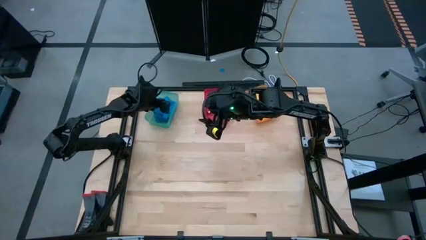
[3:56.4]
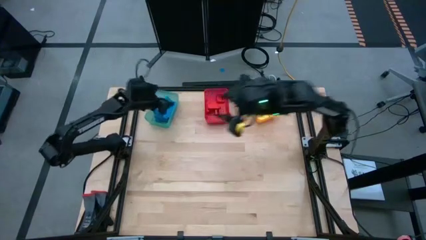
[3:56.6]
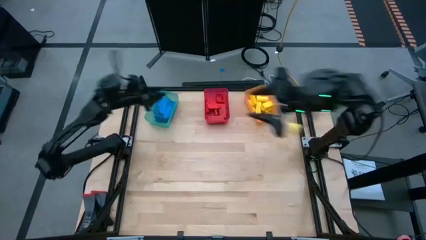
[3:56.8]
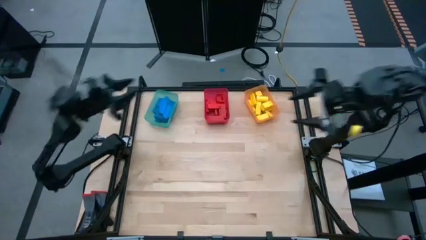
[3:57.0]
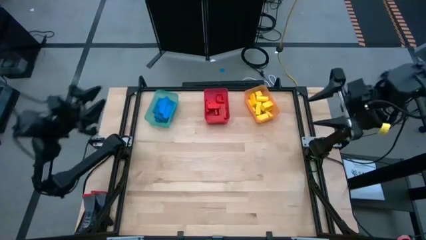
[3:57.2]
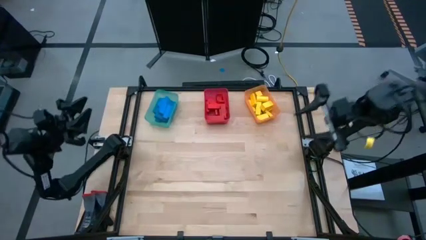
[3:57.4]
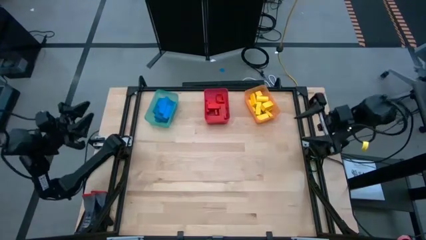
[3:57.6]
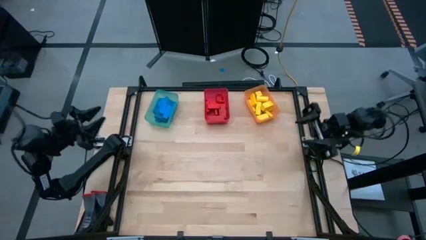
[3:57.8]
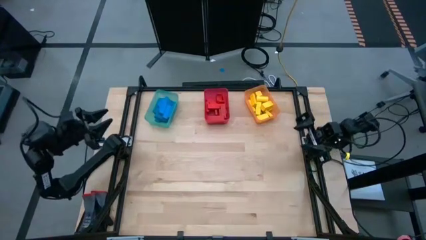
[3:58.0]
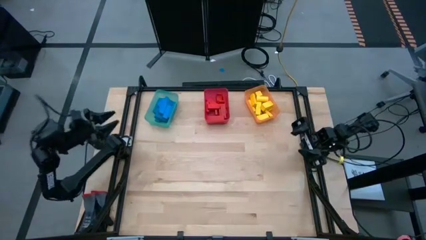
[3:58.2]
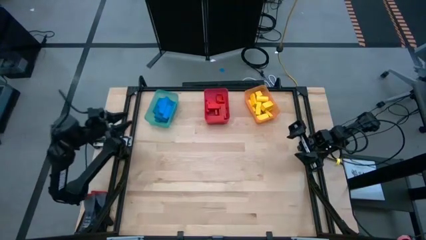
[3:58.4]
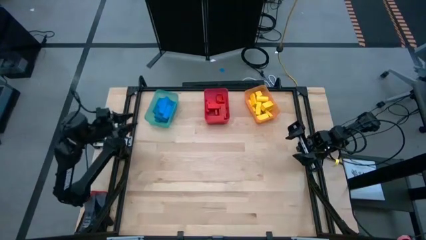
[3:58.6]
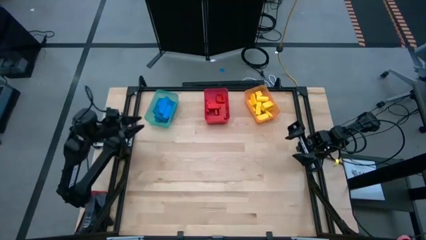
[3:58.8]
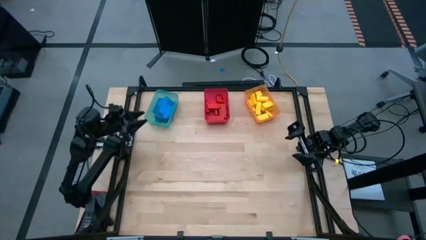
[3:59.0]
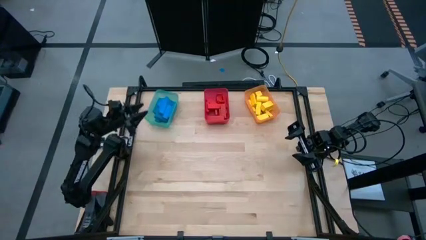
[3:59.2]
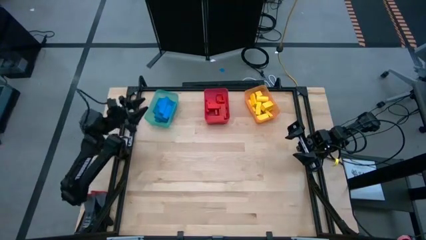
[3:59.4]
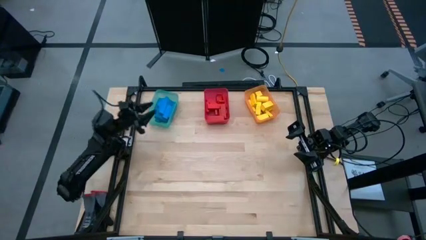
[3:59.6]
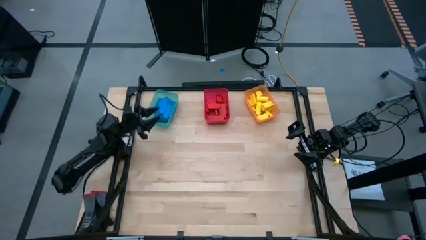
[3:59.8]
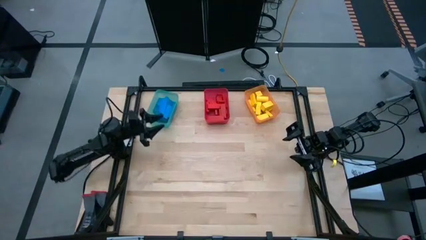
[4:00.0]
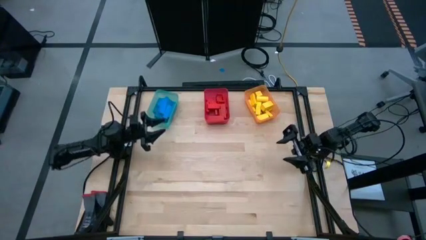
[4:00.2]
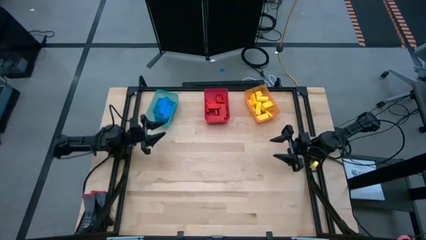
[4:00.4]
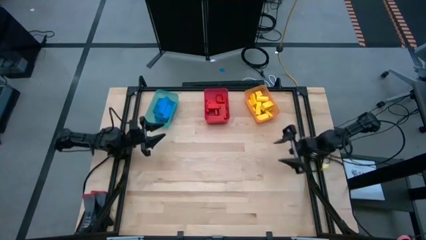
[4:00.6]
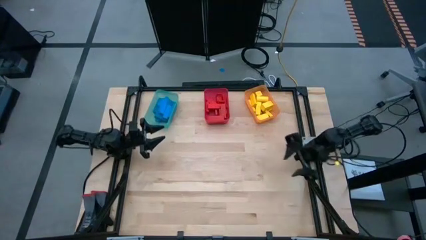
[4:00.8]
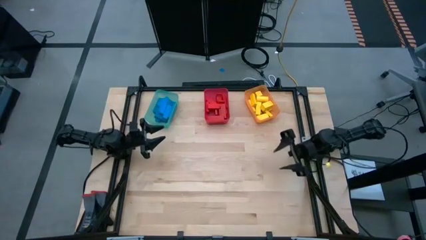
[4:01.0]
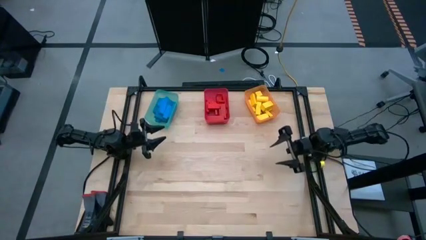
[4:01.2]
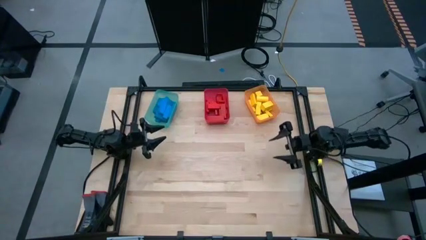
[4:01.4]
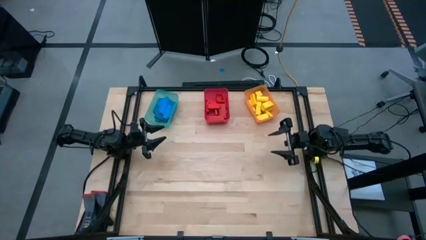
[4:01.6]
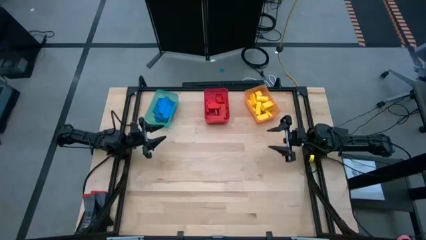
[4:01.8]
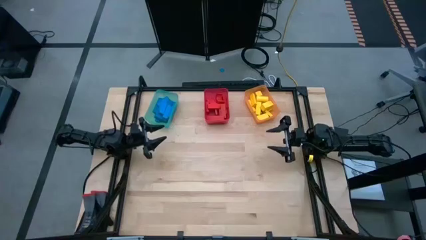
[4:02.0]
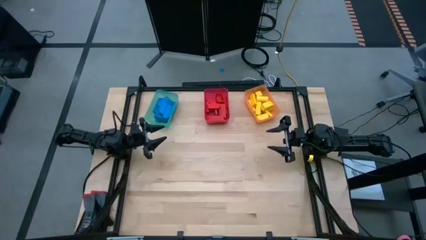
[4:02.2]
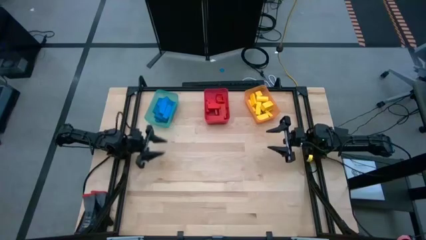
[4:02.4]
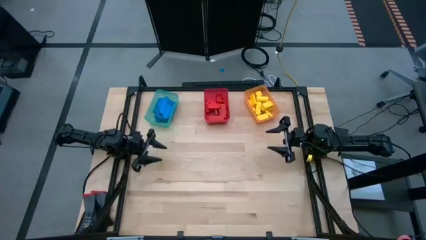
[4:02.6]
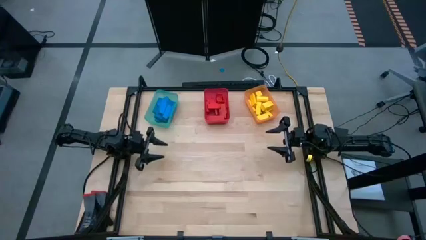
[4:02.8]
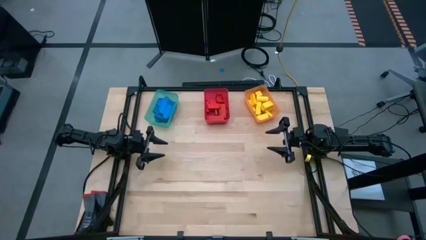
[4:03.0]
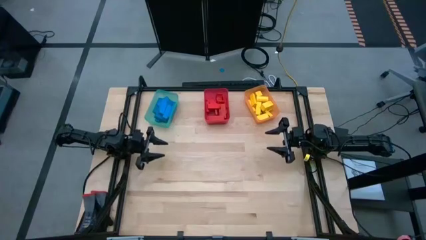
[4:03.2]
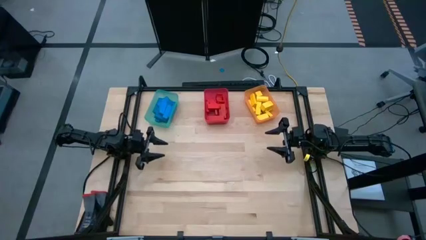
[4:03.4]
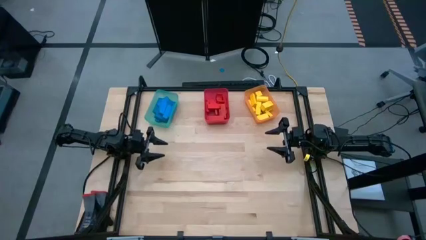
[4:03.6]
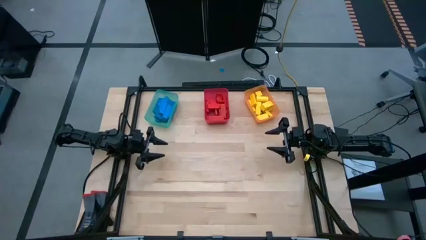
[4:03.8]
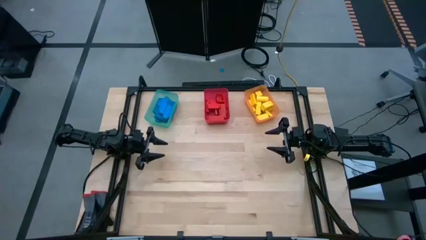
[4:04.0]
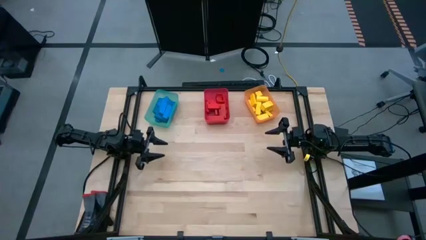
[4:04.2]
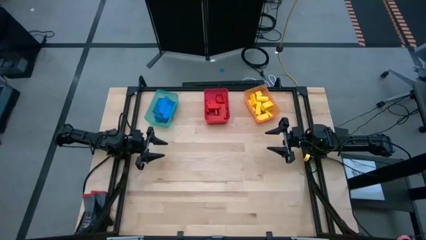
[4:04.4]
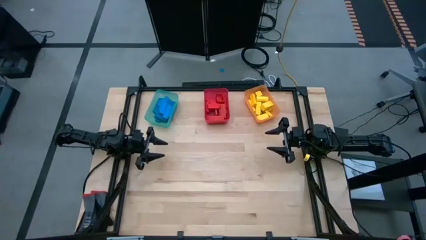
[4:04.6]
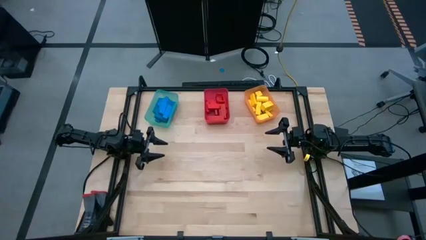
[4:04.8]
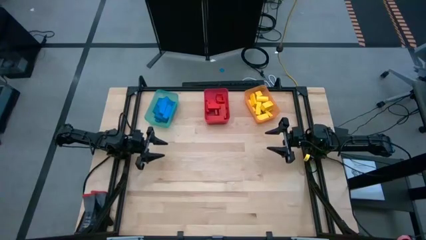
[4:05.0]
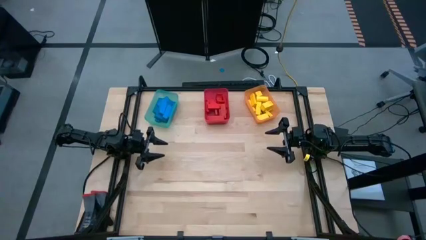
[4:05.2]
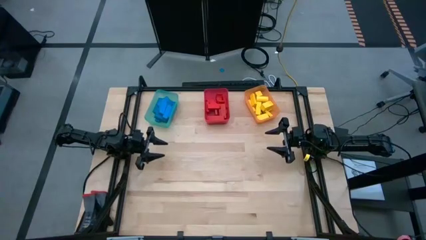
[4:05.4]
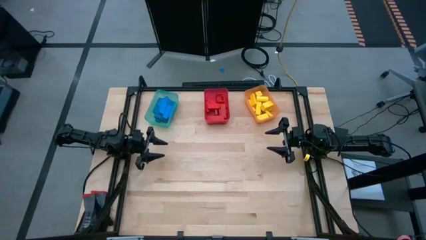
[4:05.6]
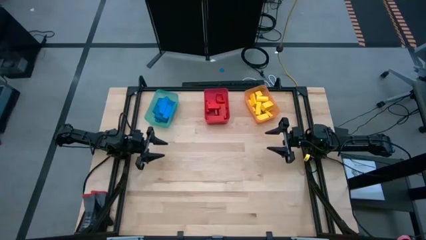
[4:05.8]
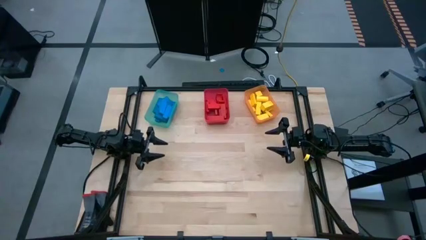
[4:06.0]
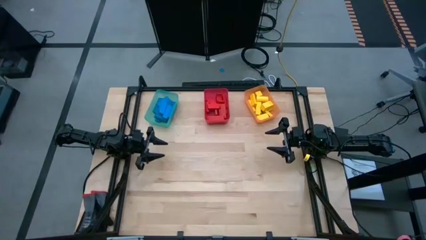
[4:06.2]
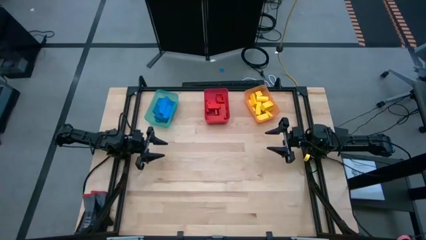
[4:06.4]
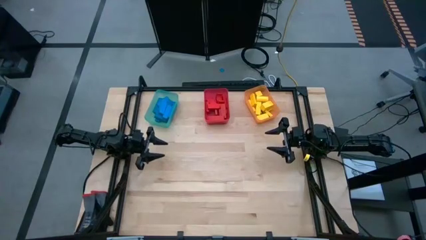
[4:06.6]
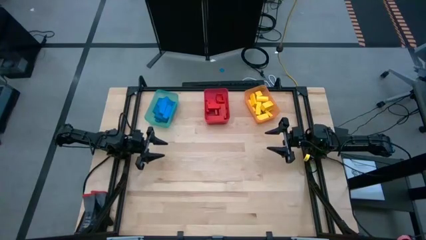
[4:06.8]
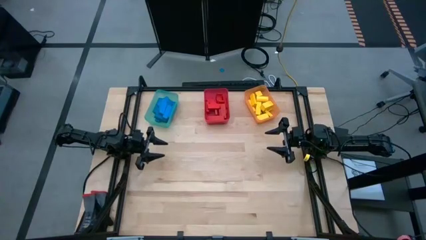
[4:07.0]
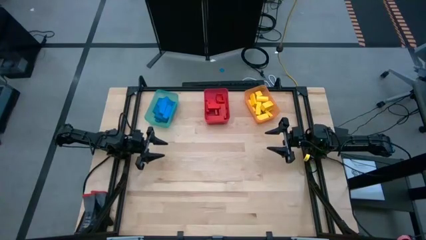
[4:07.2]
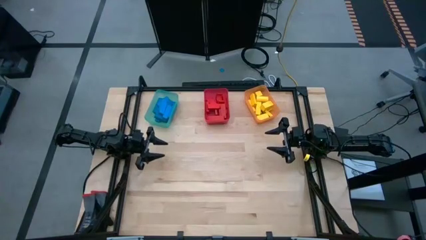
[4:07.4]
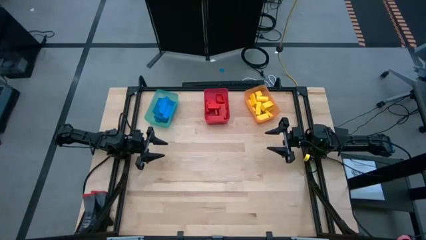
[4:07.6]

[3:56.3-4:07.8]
Task: Sort blocks
Return to Home Position
